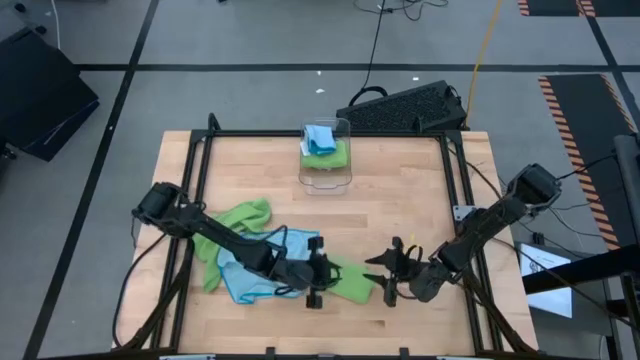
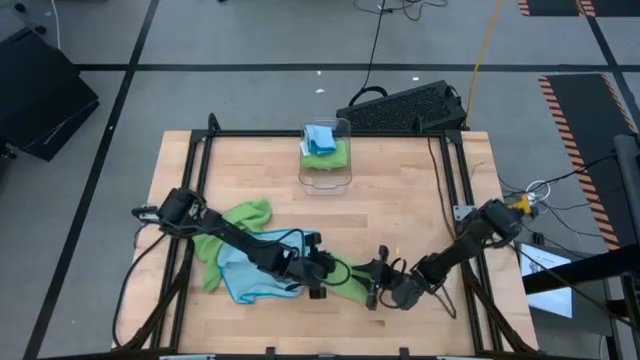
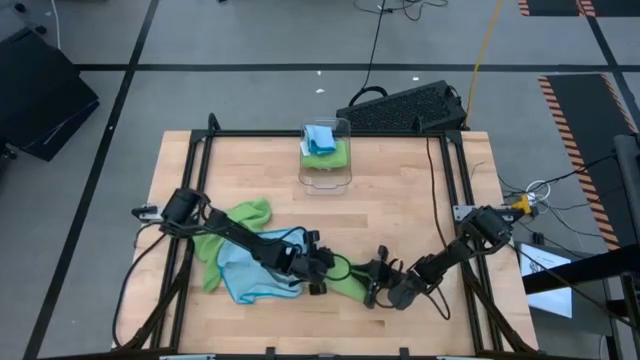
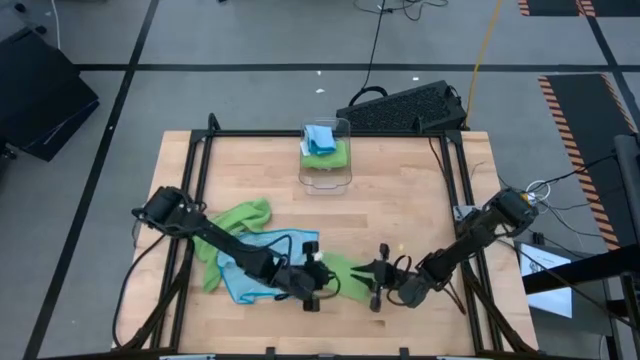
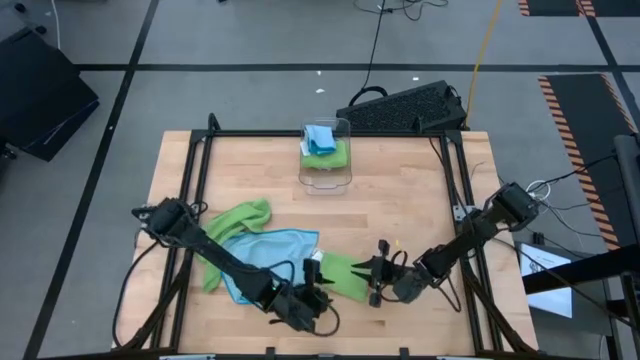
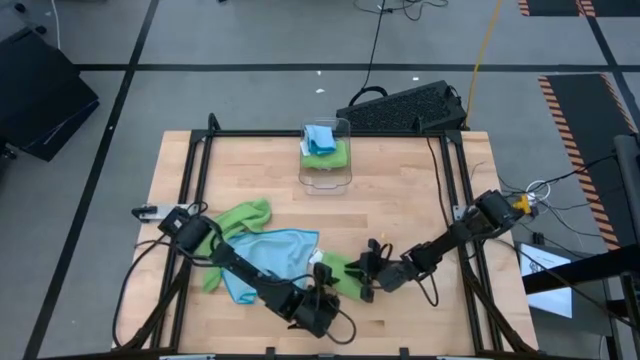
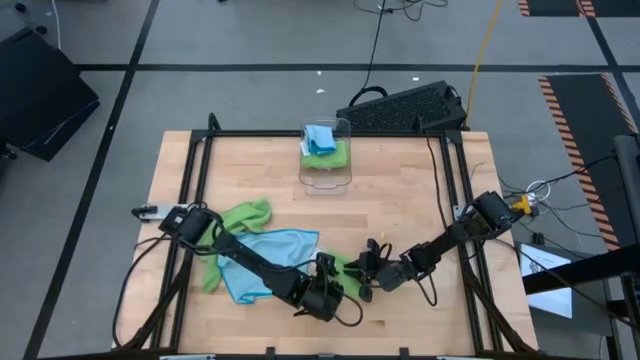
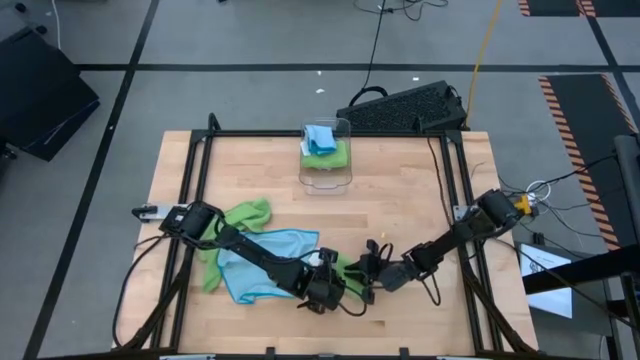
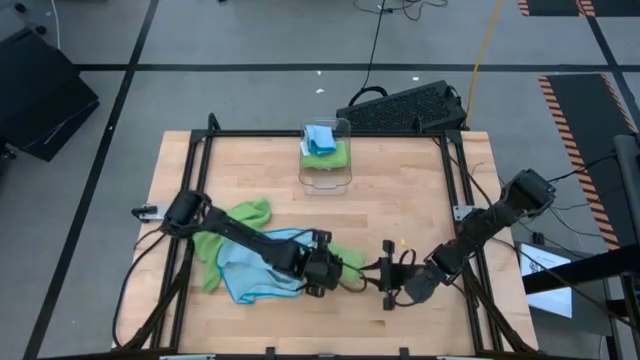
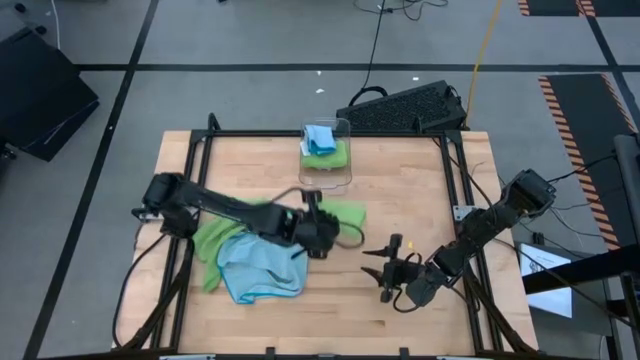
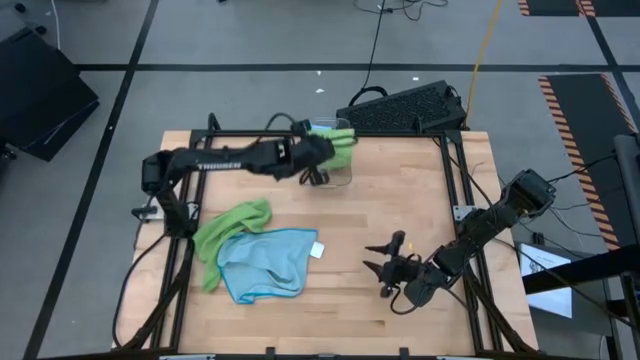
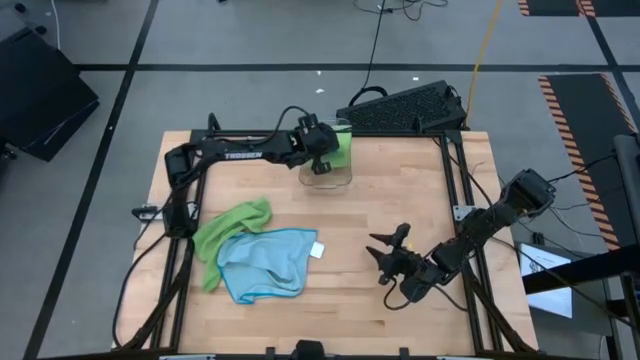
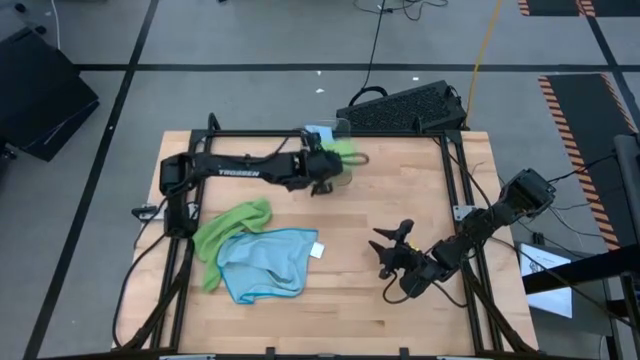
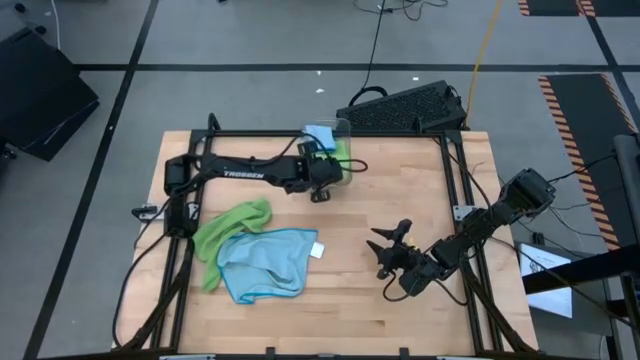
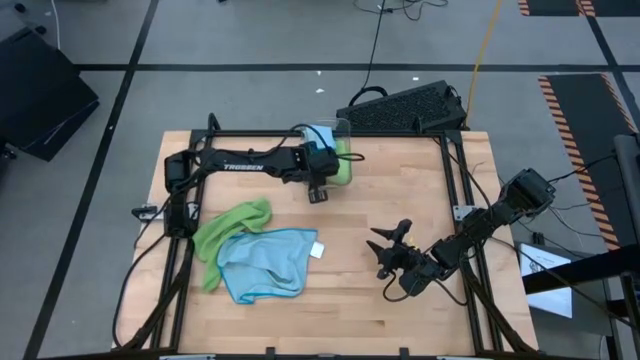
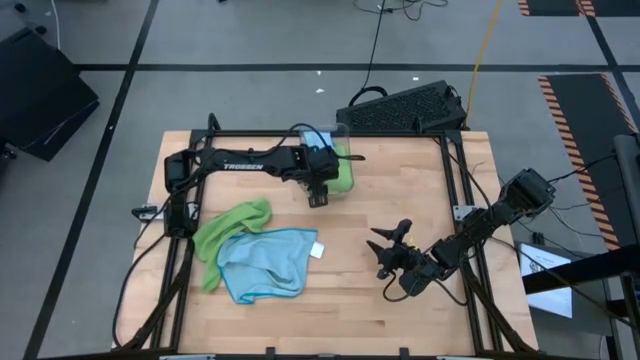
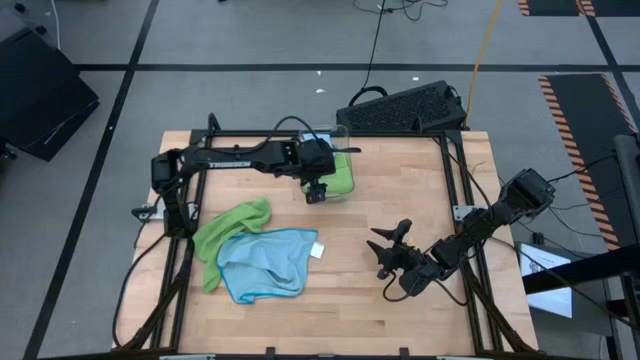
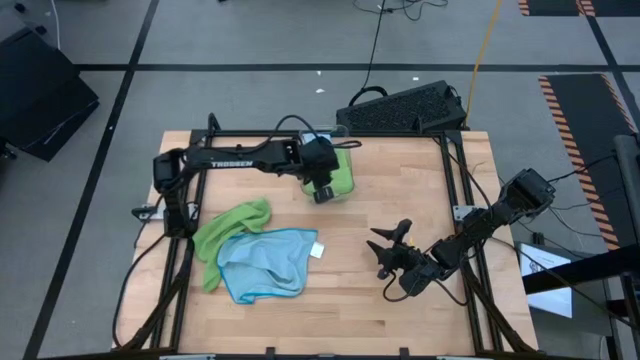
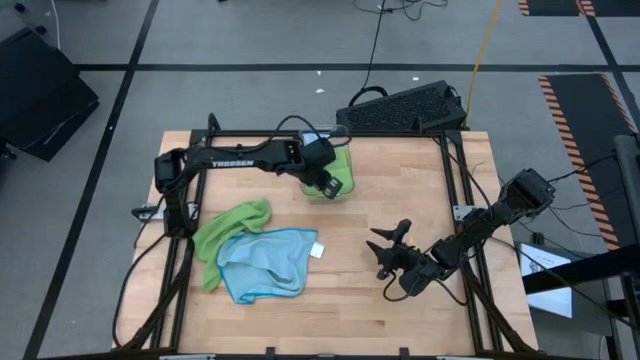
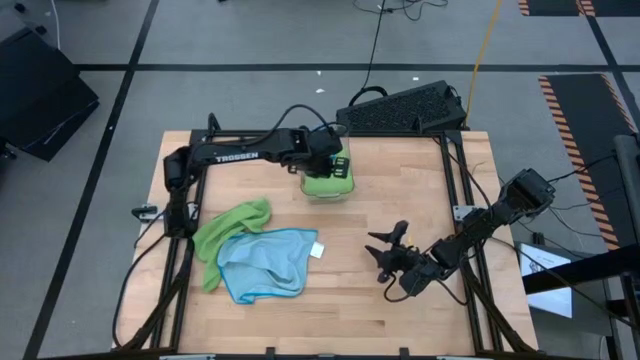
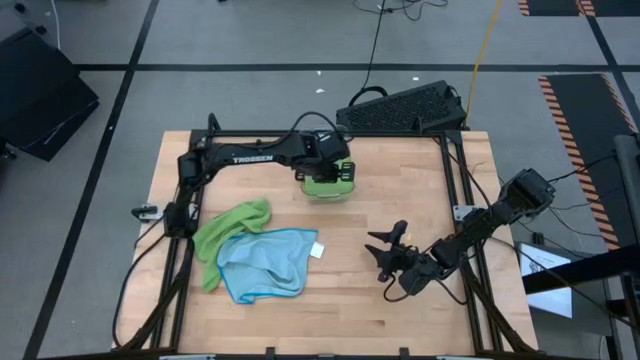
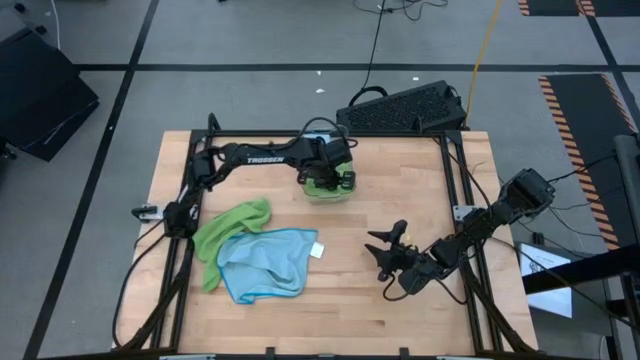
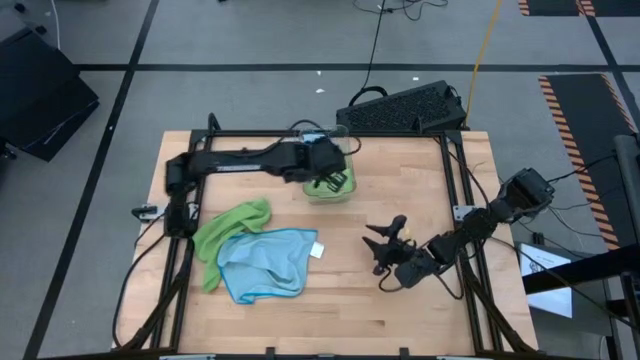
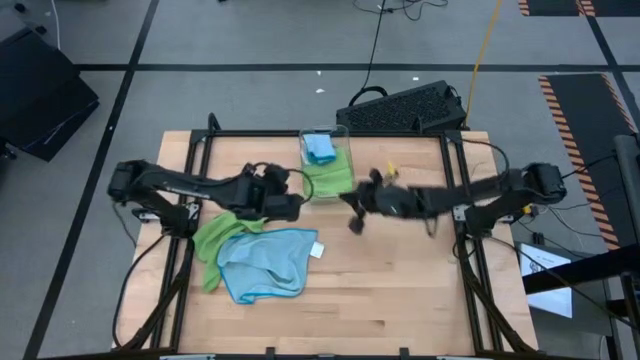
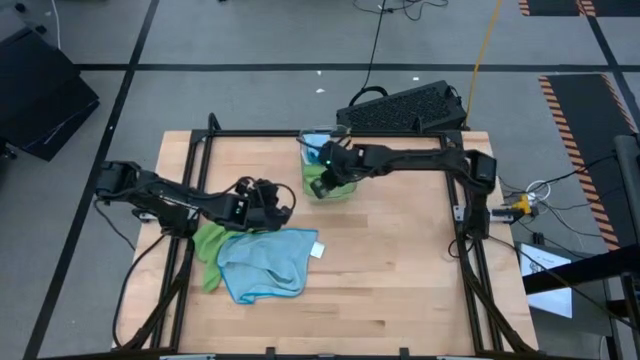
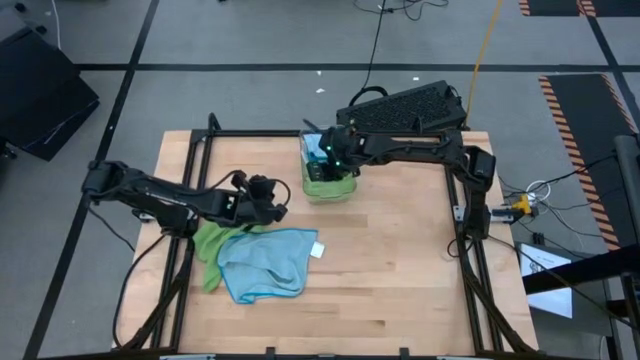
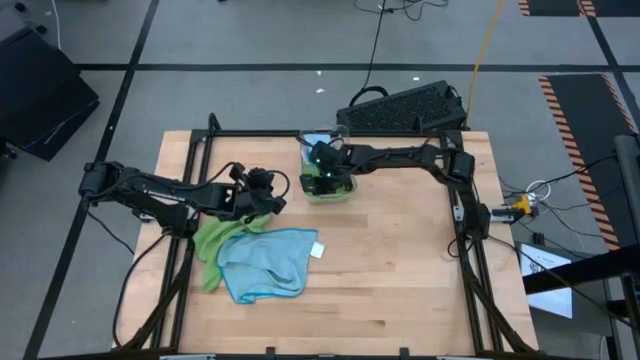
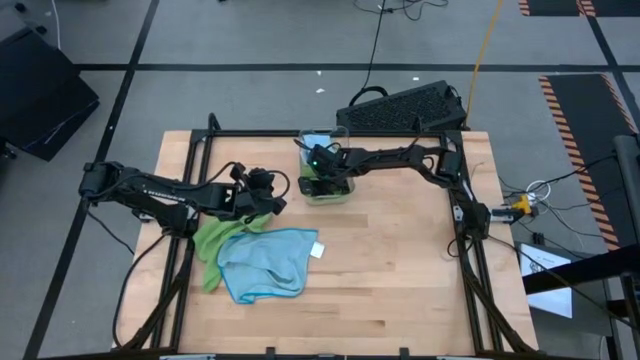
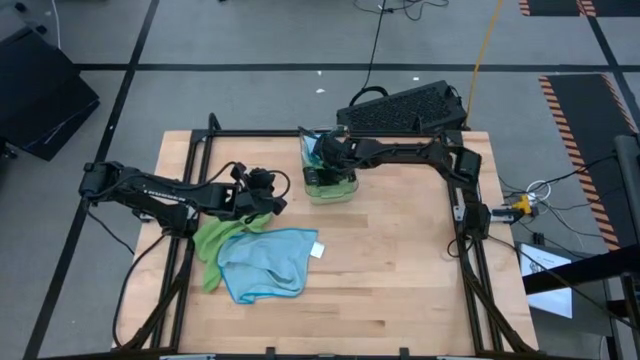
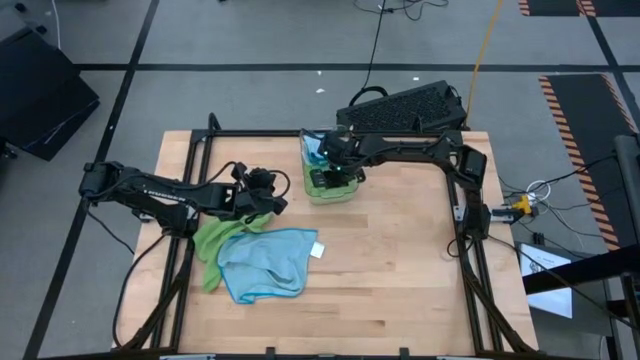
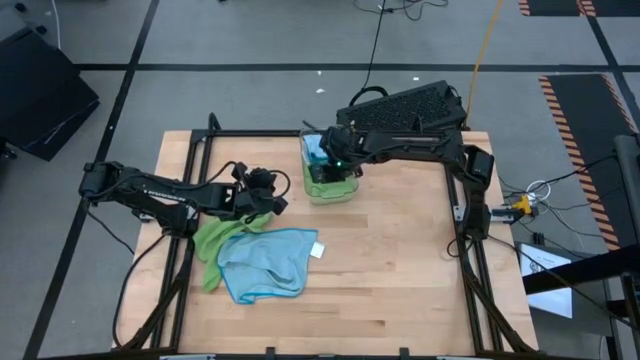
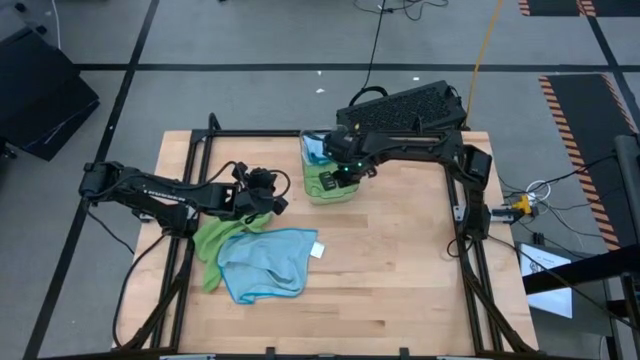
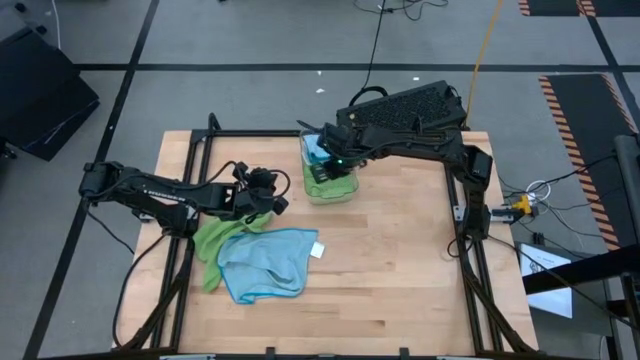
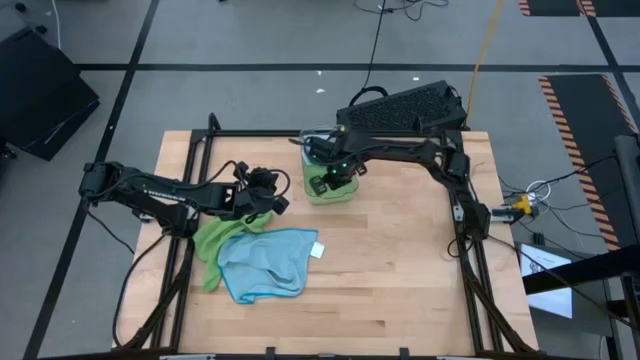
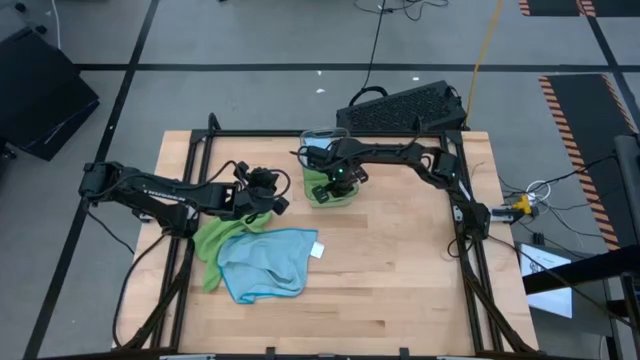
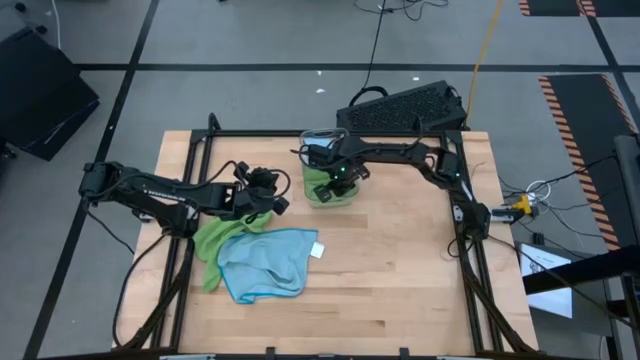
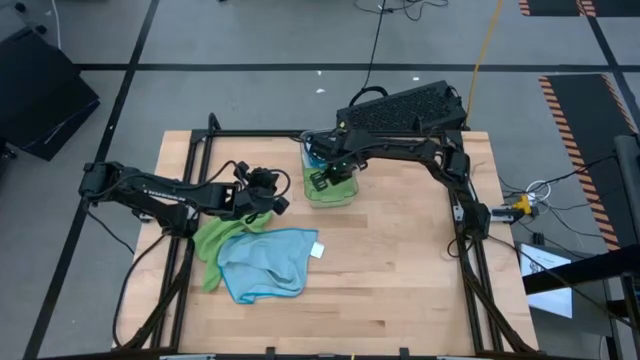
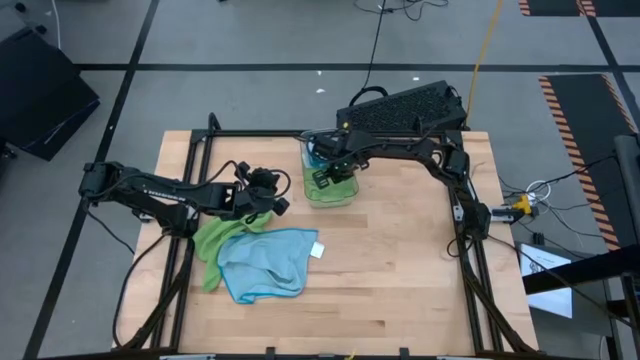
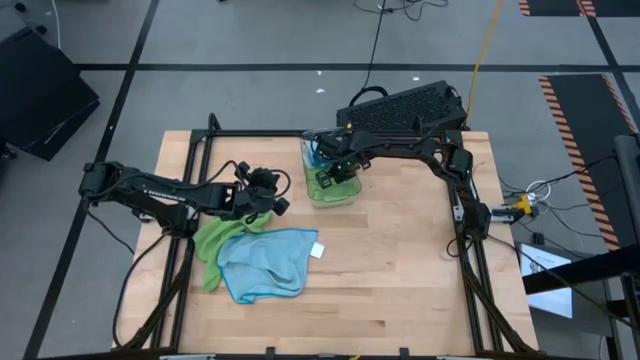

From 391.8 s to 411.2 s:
Task: Fold microfiber towels
Put the green towel into the transparent bin
